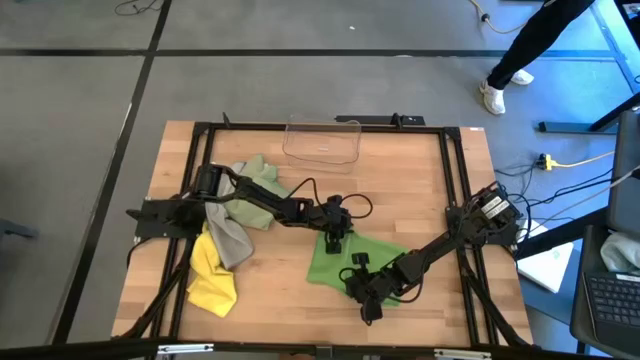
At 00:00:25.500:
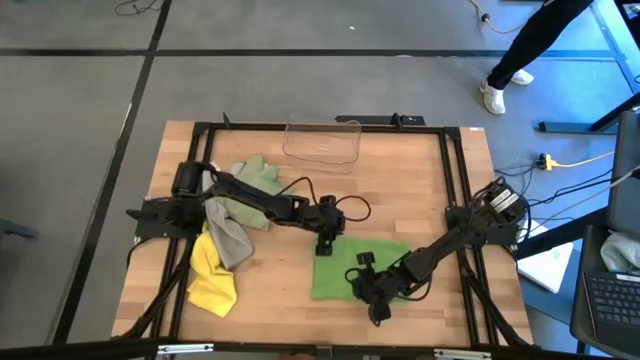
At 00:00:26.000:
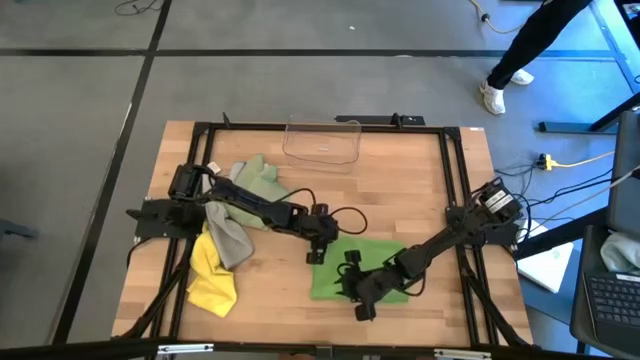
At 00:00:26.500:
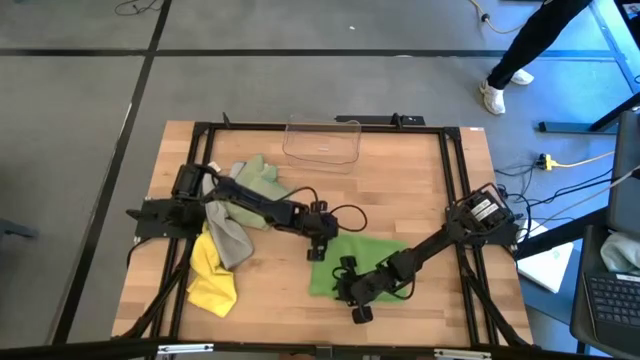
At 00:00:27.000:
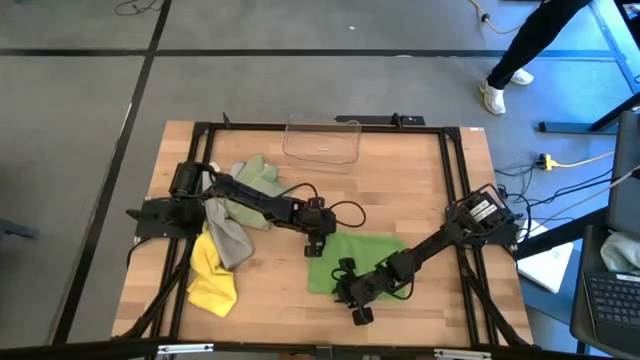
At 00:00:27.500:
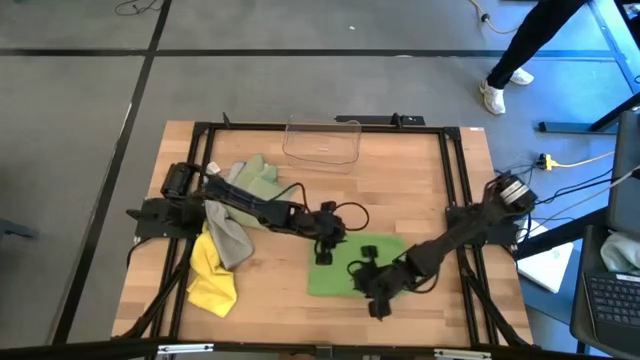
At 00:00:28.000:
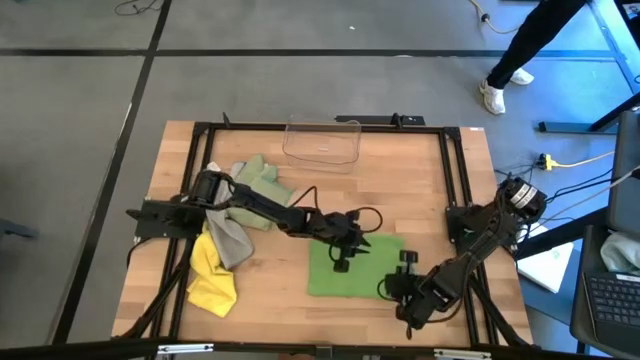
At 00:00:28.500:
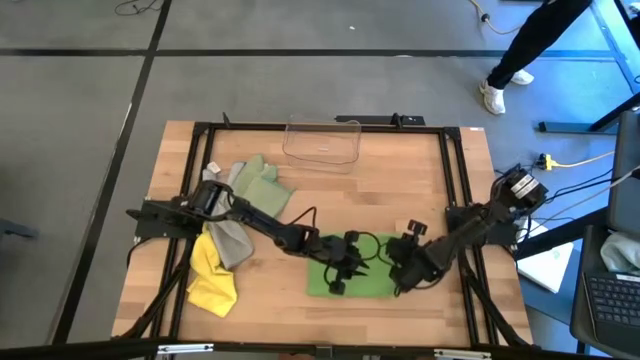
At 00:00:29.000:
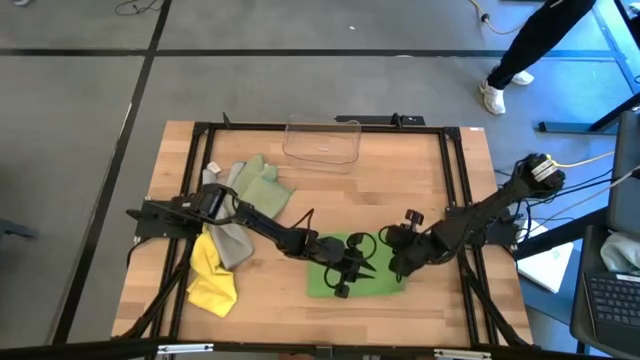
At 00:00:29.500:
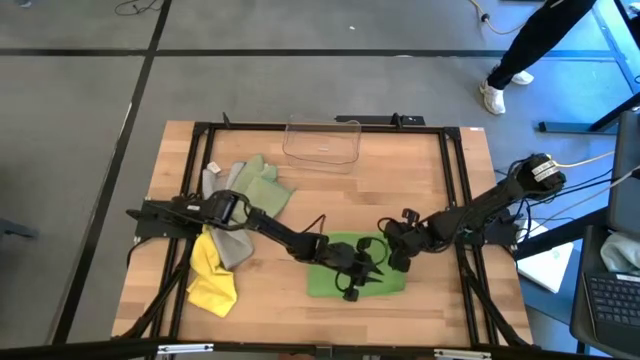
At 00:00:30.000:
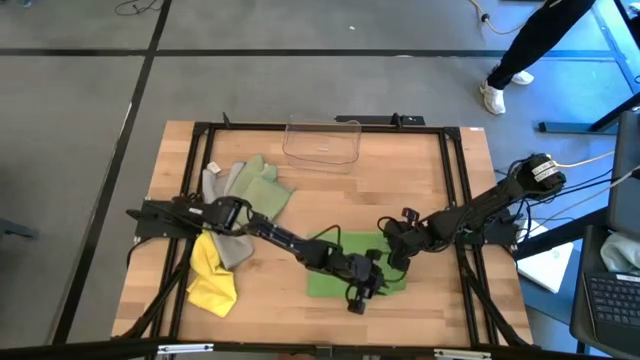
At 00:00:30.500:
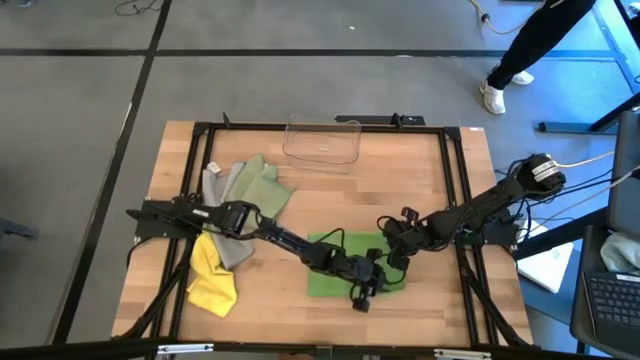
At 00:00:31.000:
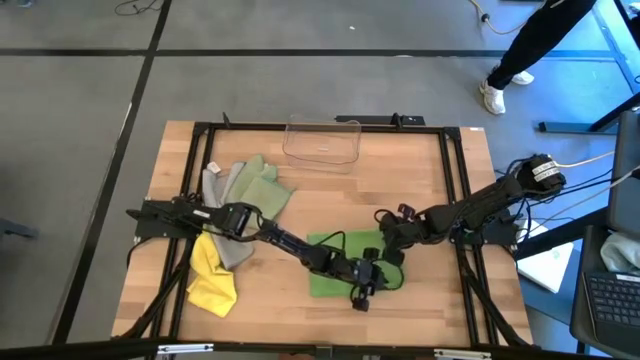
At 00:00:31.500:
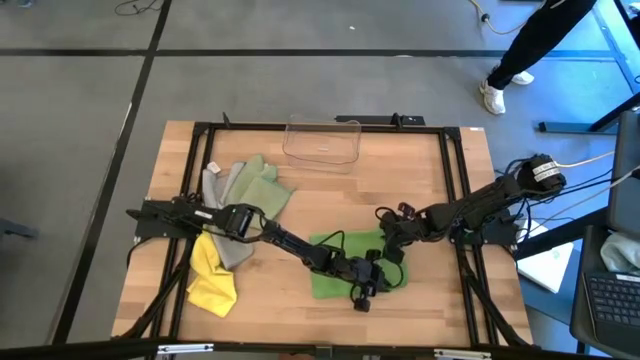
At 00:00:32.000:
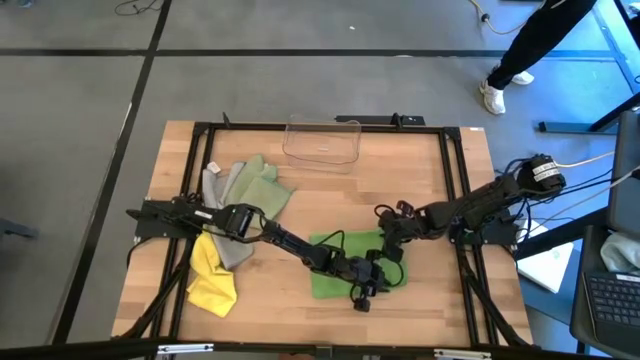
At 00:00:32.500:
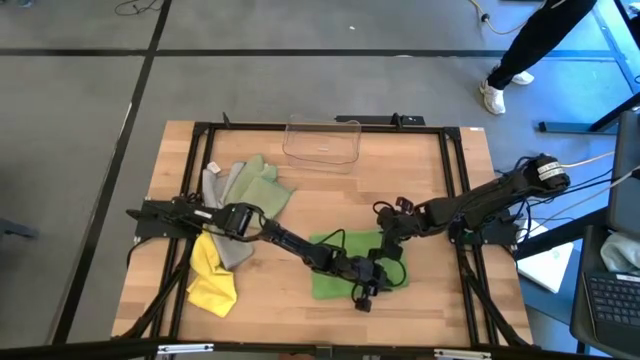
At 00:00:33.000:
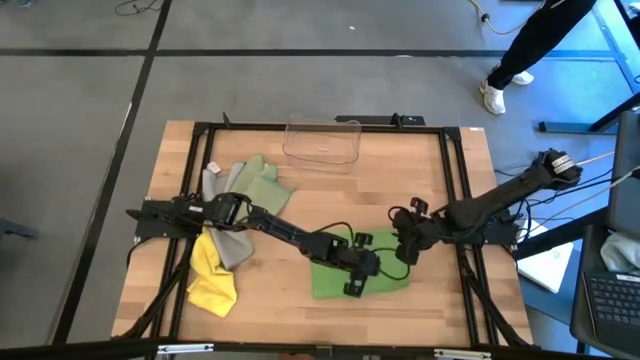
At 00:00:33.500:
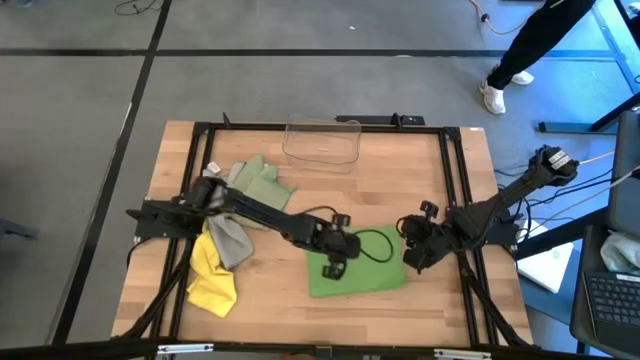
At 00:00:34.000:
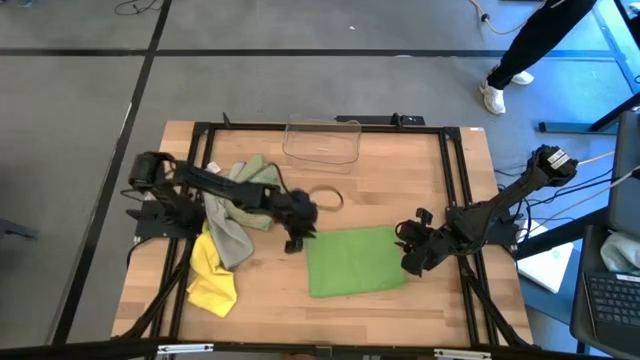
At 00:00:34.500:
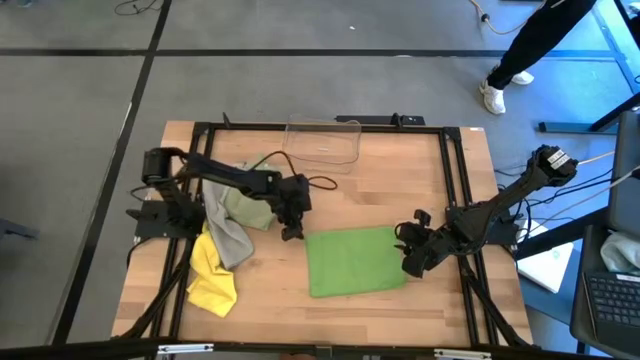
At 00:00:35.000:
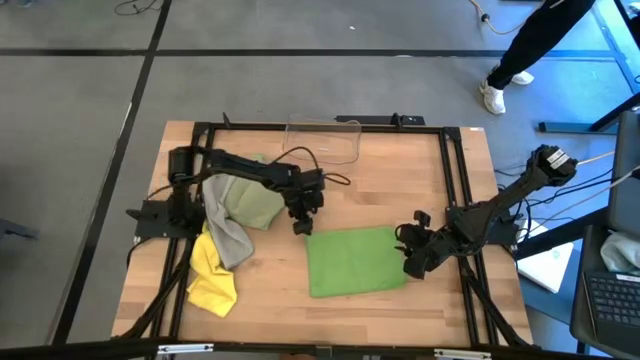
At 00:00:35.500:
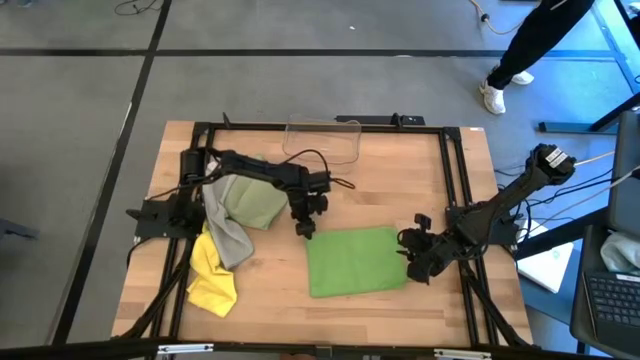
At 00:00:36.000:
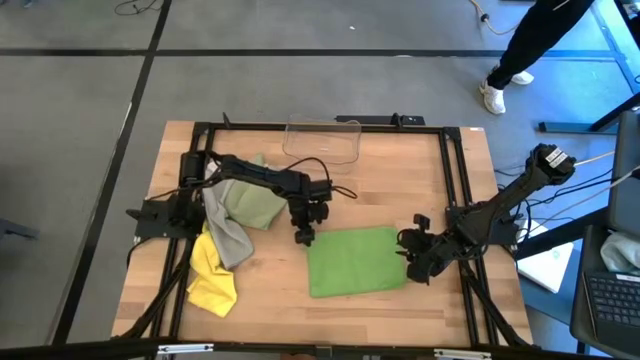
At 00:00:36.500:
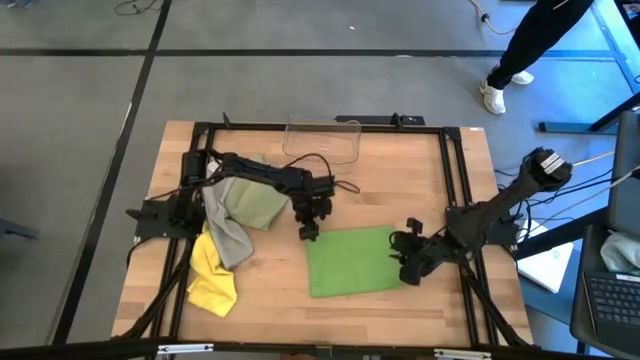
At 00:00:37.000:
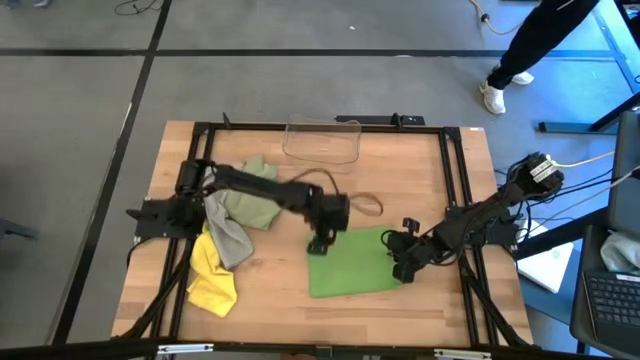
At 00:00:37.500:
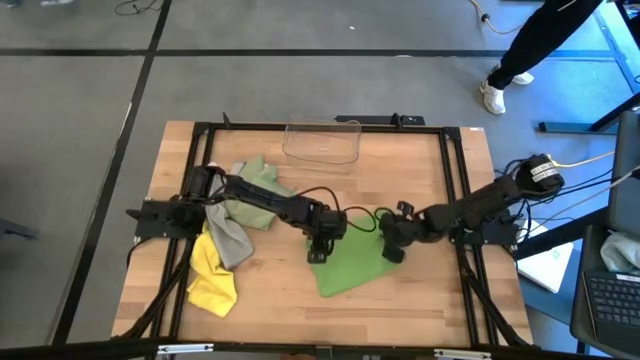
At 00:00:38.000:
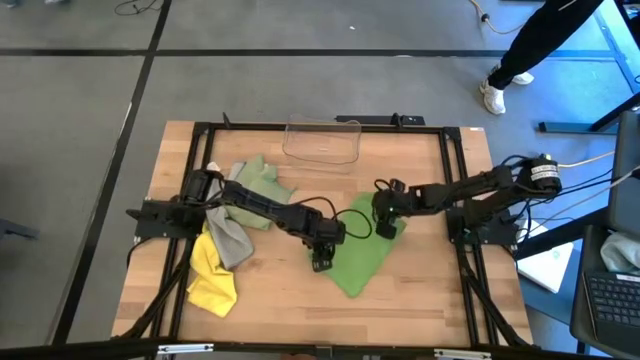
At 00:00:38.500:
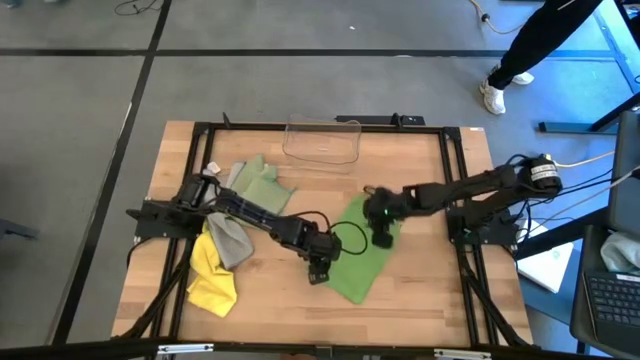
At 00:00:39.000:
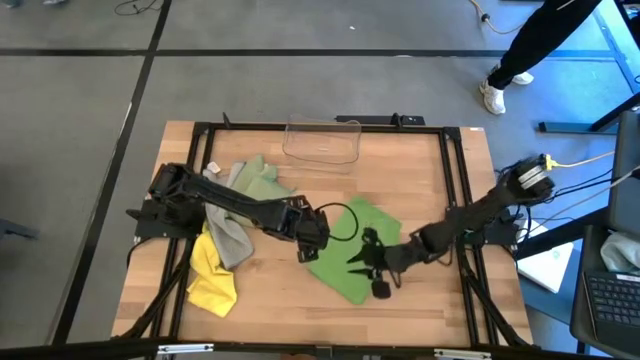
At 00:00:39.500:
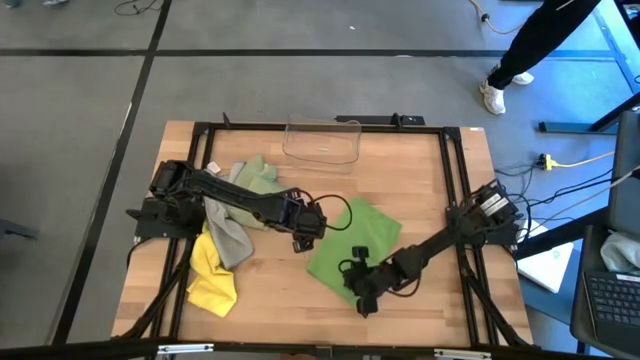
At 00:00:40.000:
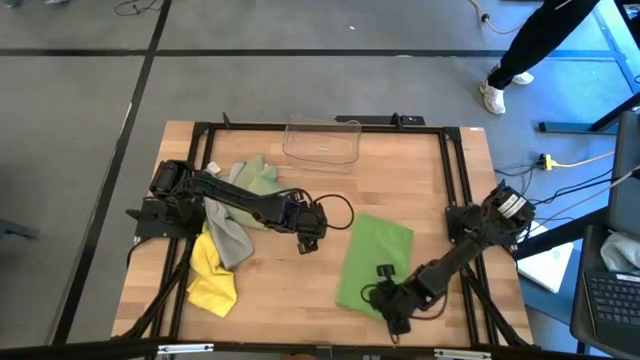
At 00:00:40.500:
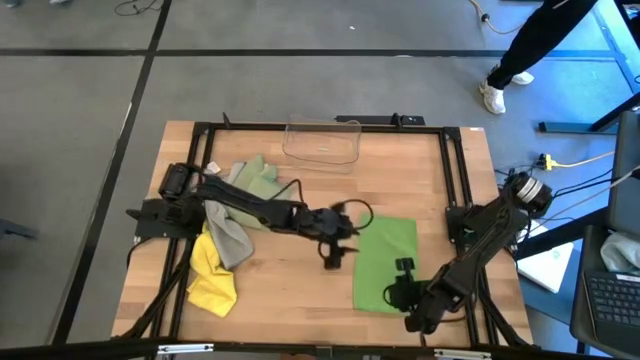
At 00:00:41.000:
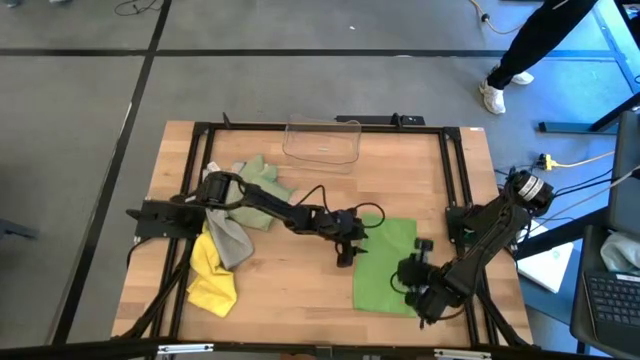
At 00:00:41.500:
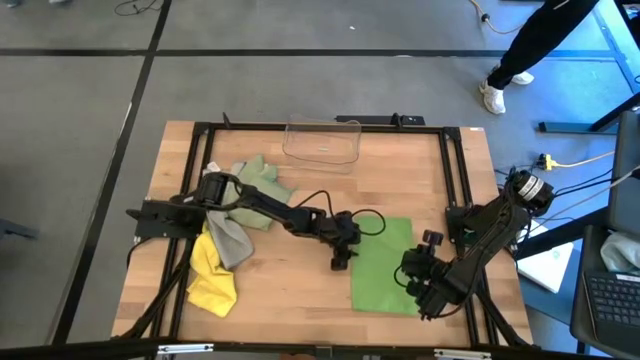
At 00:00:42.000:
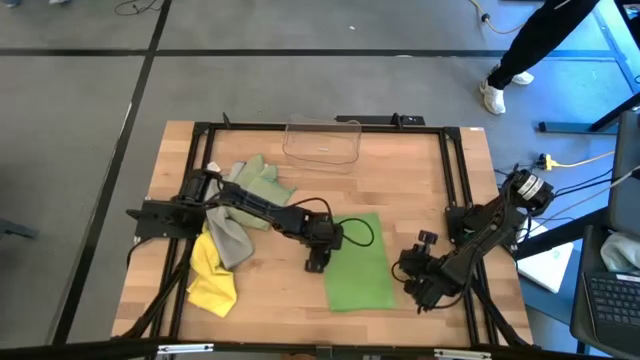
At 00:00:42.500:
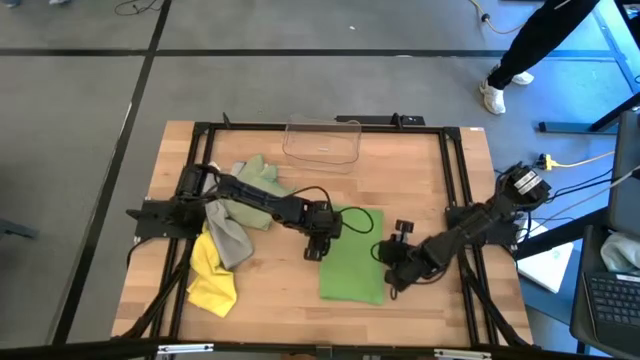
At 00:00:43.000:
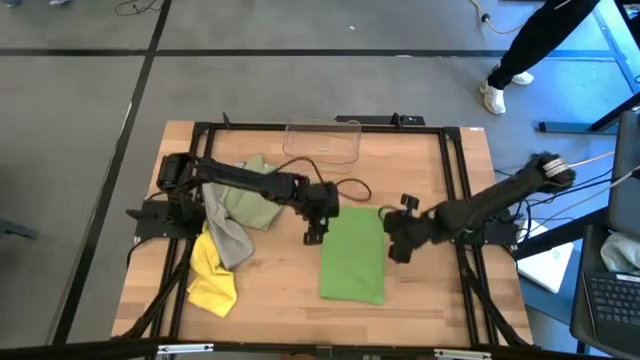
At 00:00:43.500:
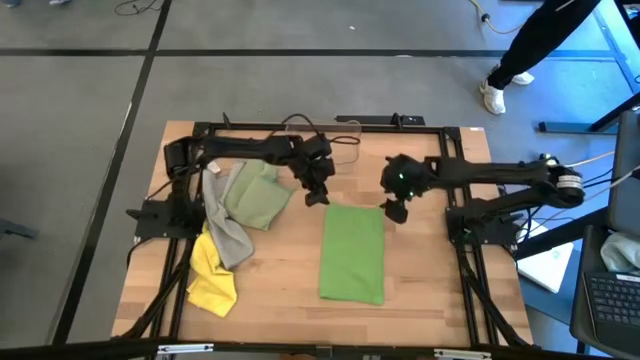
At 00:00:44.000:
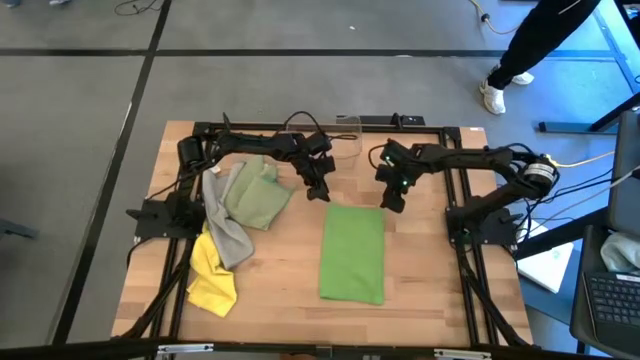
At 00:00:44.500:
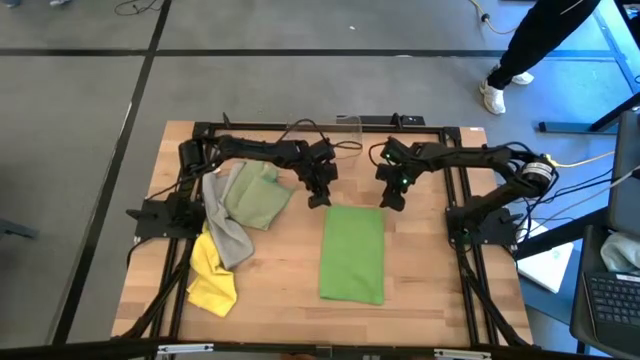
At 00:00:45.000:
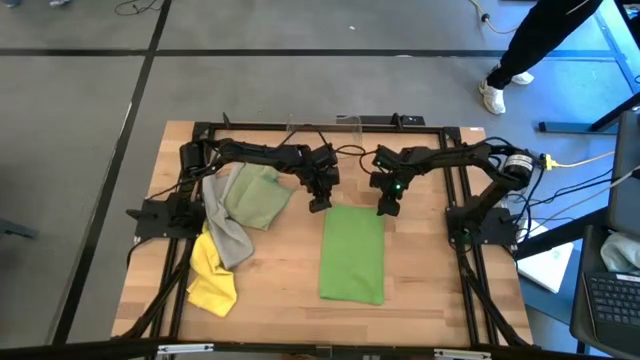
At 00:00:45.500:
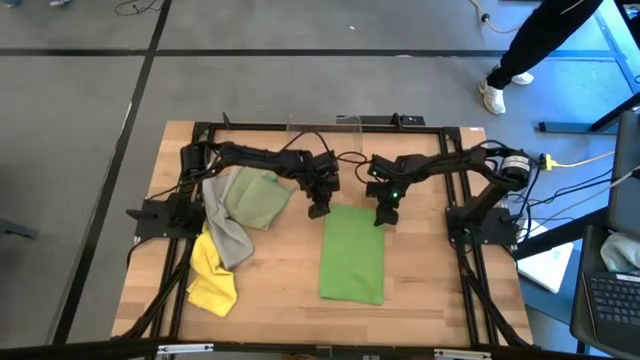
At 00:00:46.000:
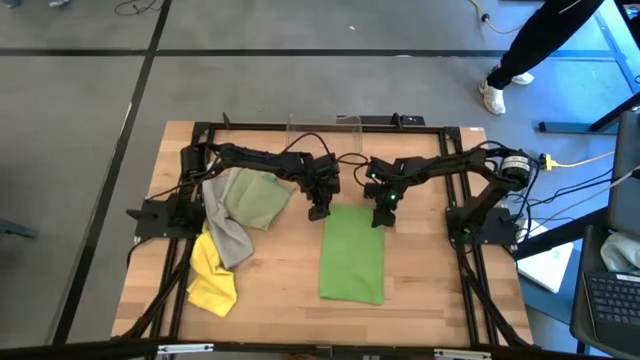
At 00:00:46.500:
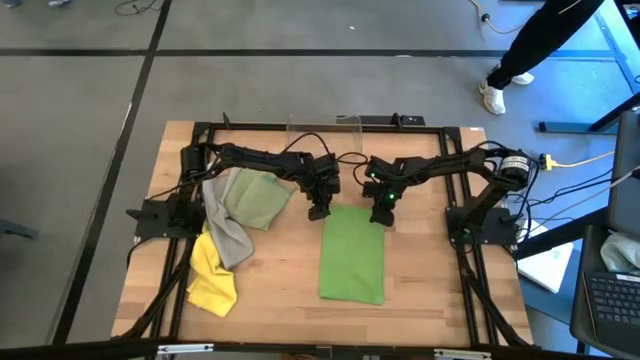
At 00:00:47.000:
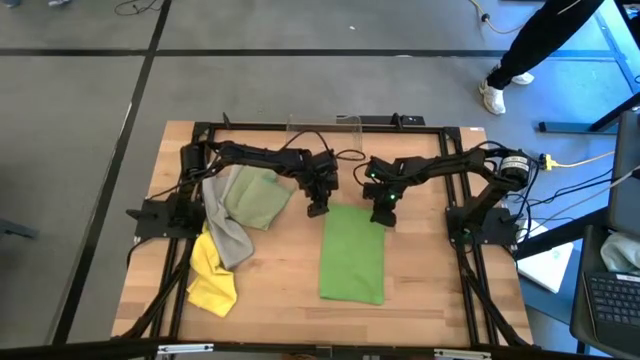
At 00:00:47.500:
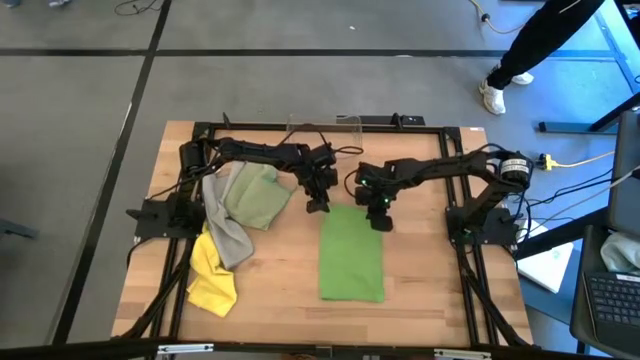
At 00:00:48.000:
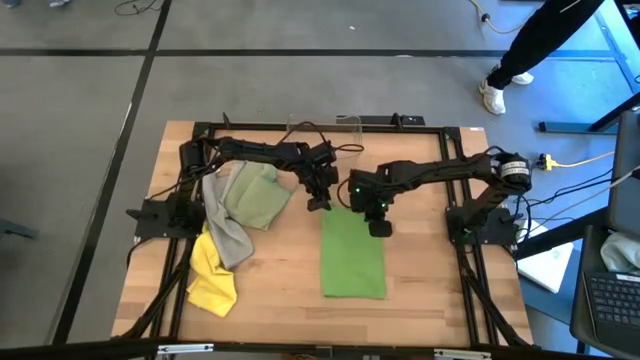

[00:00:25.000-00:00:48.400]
Task: Fold microfiber towels
Fold the green microfiber cloth
